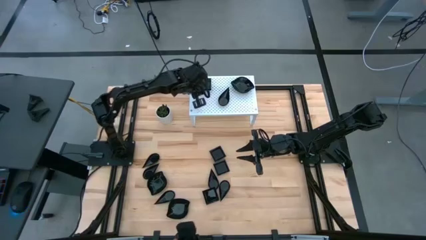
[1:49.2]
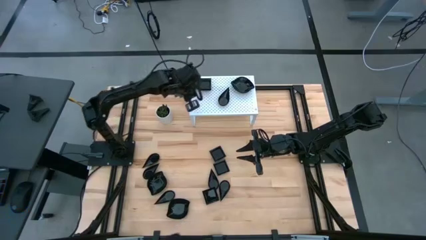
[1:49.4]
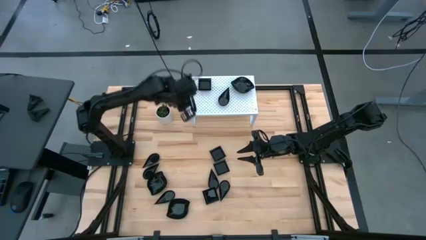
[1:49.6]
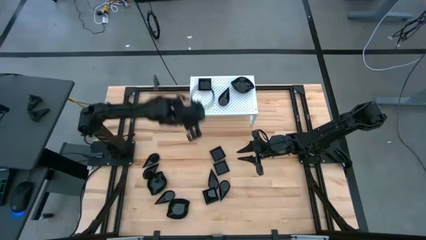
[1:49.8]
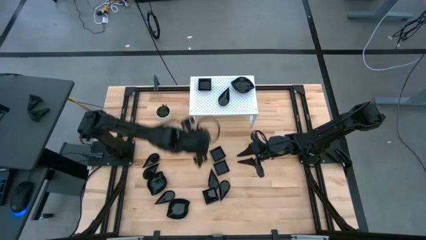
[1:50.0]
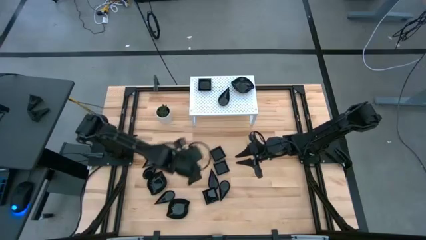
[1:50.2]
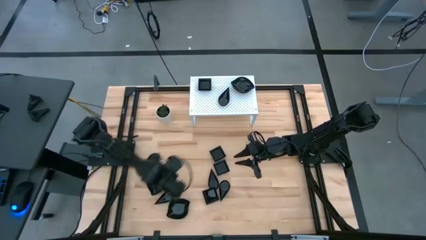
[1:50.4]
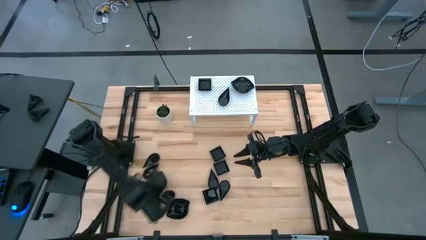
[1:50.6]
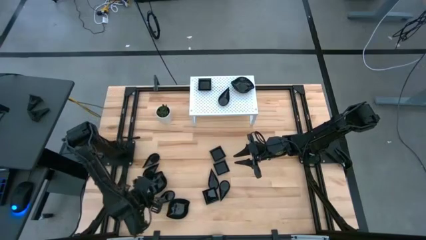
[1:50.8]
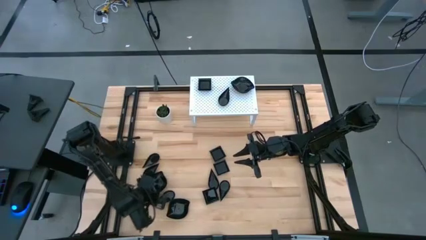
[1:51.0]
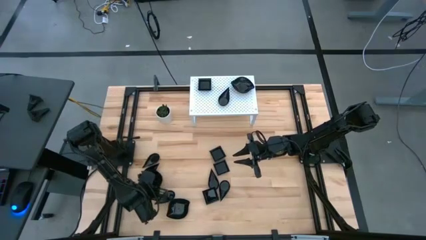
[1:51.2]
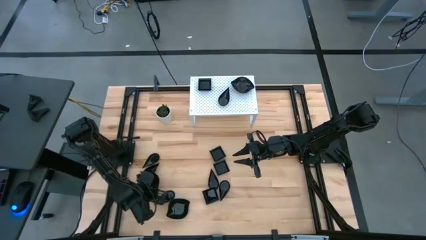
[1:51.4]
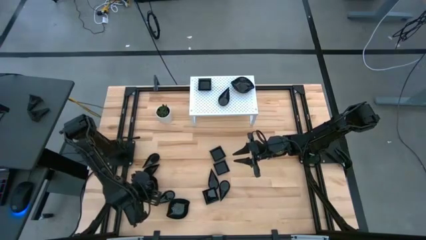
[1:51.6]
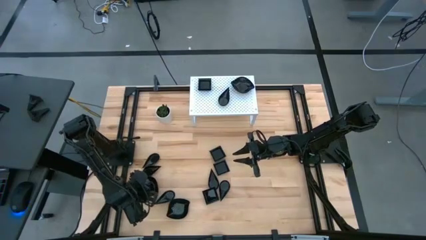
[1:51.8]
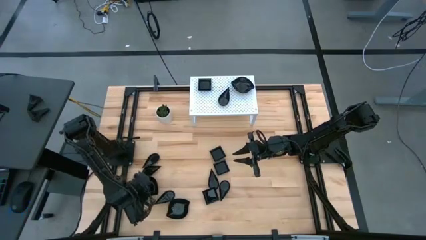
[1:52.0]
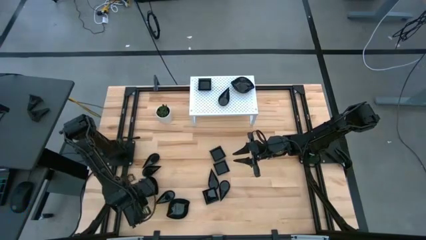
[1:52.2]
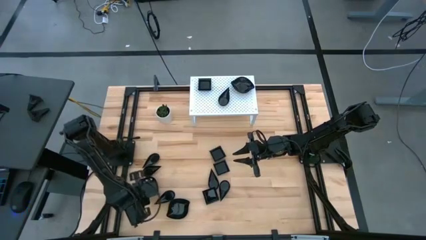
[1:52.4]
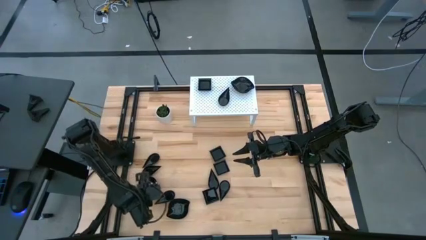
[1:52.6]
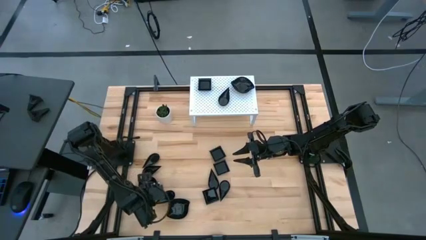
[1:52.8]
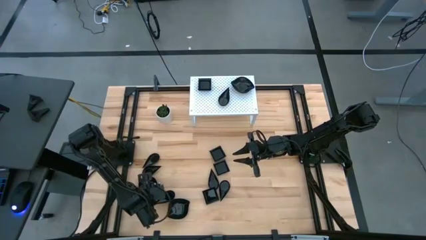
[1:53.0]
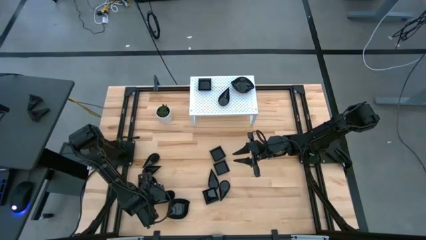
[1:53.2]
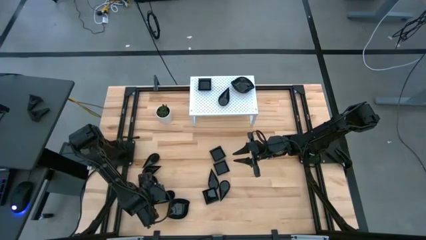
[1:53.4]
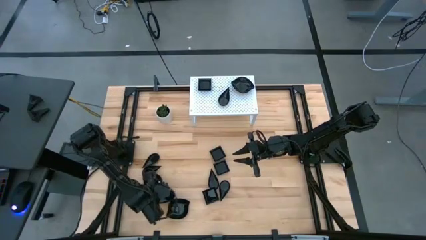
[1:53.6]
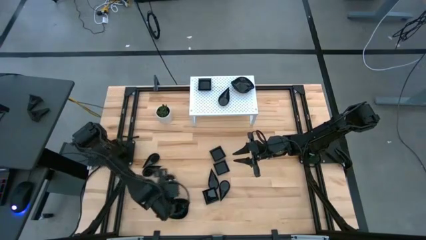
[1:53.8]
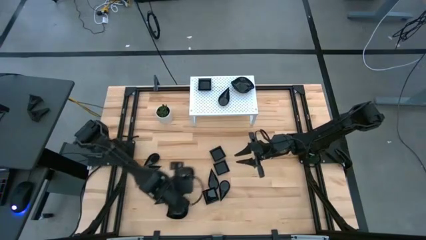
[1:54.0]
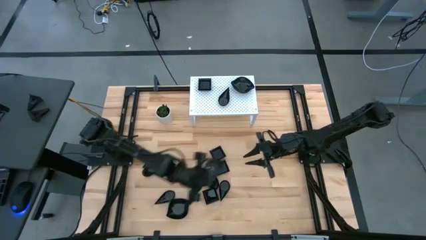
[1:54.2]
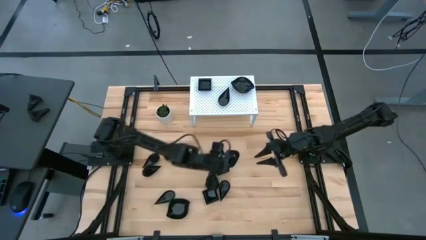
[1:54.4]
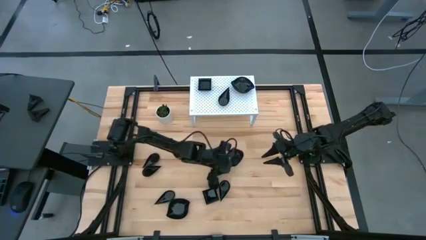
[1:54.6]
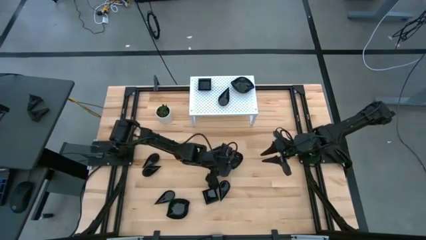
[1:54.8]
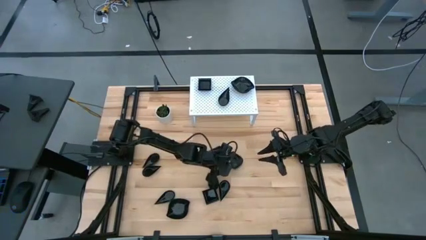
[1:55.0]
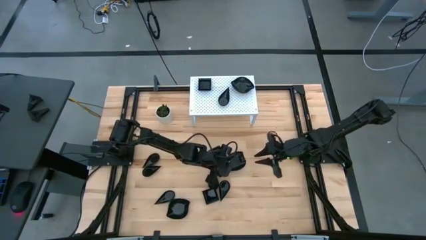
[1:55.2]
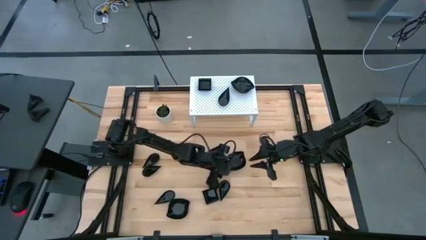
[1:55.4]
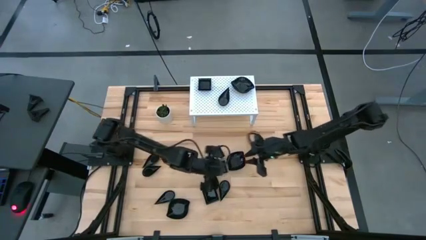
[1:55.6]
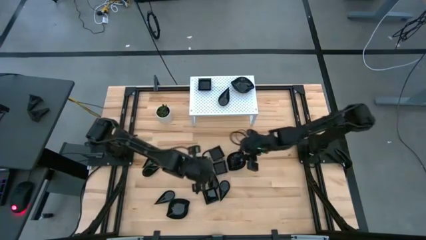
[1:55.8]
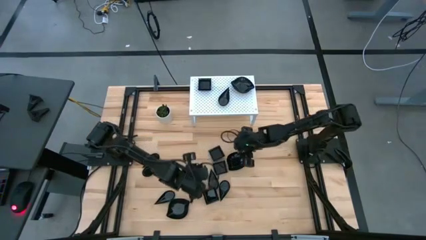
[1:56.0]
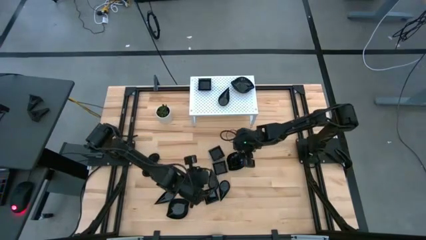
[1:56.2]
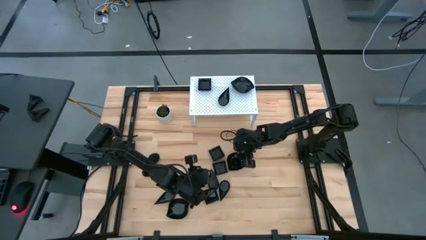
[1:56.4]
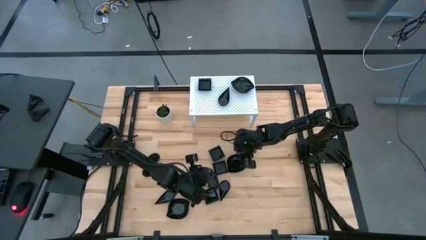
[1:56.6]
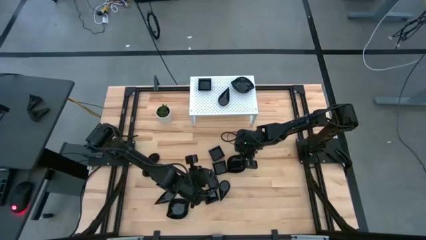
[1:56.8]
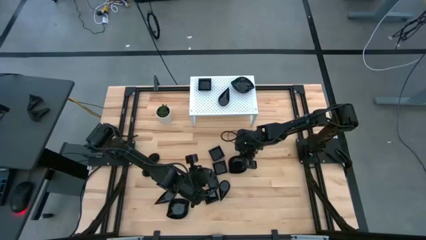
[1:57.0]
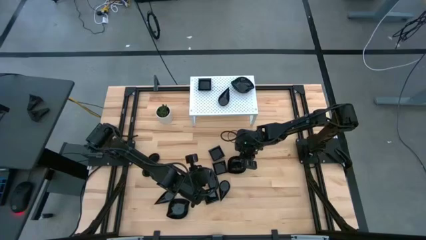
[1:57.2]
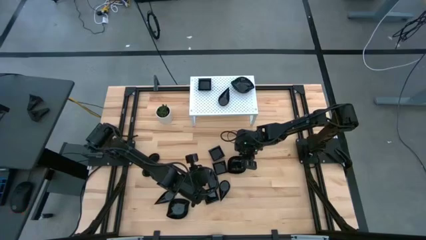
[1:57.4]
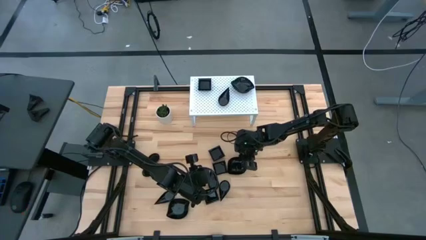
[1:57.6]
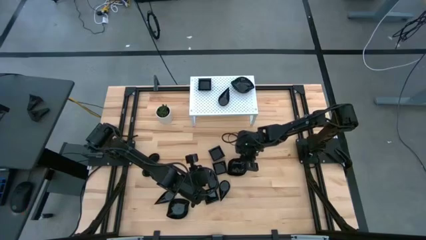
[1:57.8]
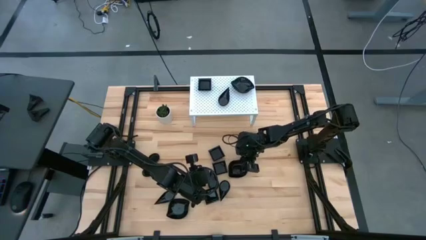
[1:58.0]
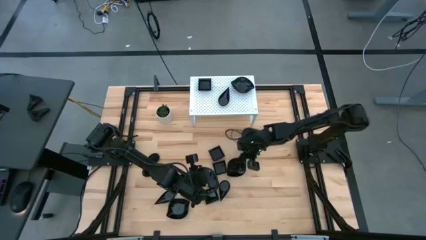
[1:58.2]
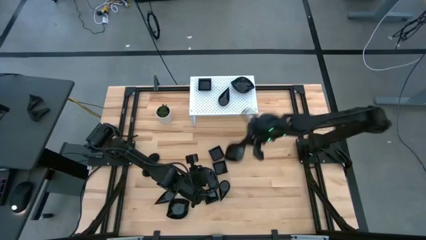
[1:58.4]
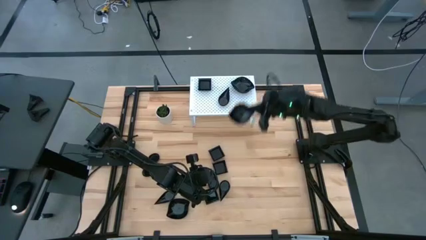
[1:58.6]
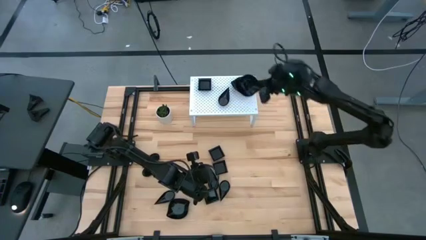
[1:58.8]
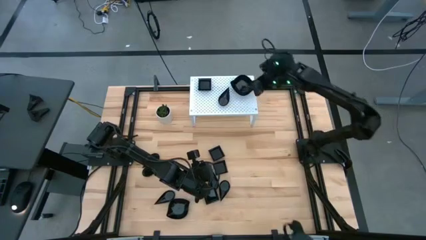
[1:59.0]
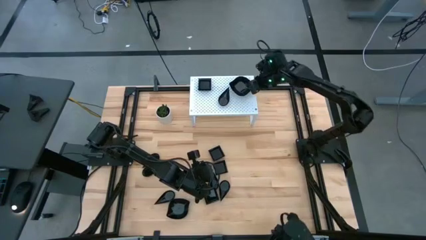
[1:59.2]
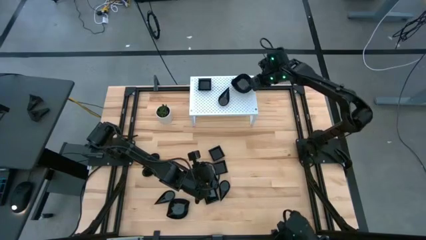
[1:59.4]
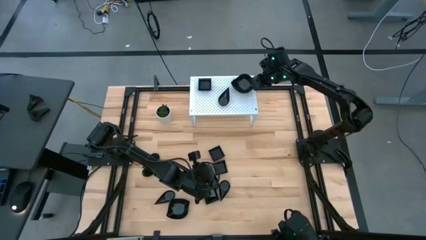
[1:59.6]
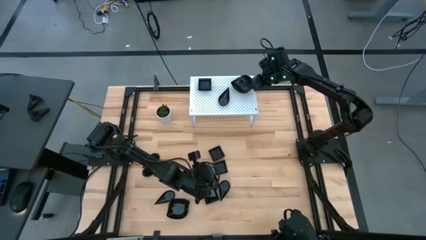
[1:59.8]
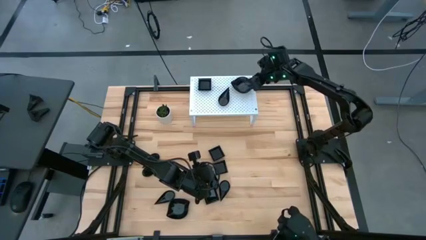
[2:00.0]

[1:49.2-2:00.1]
Task: Pick & Place Mini shaped plates
Stack the black plate on top of the black plate on the shelf

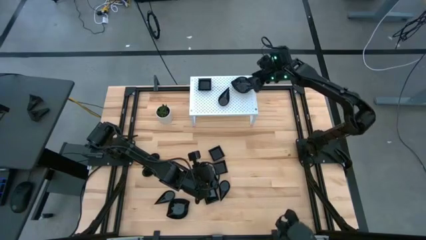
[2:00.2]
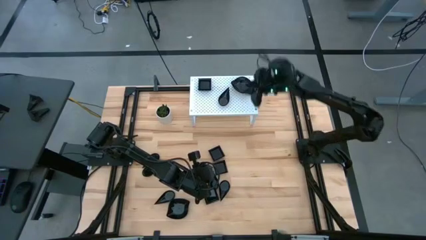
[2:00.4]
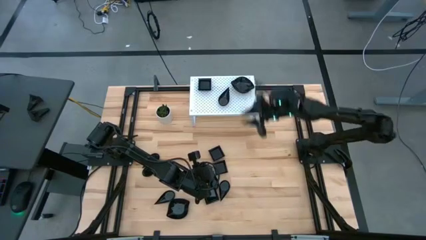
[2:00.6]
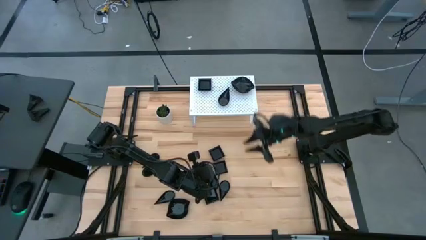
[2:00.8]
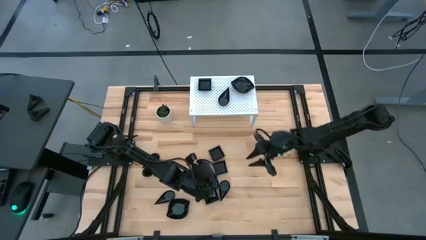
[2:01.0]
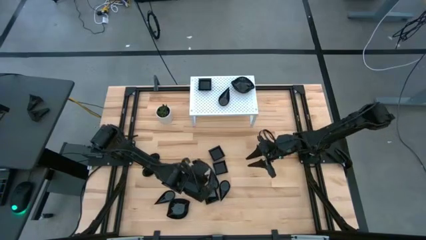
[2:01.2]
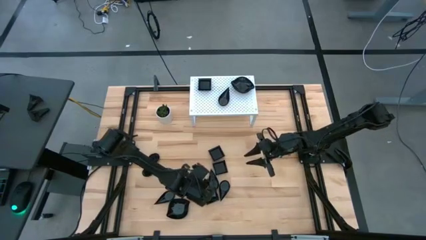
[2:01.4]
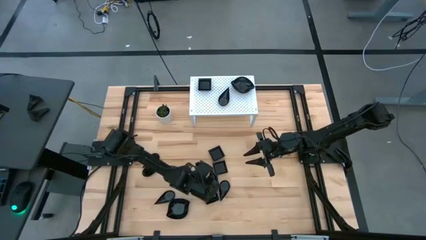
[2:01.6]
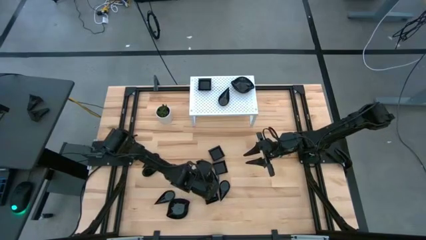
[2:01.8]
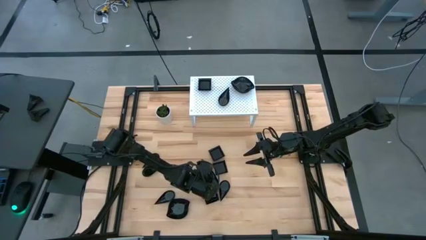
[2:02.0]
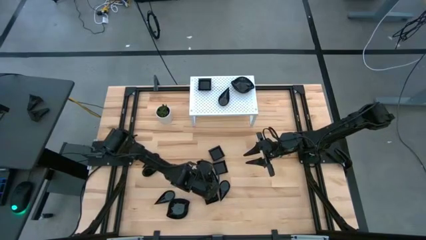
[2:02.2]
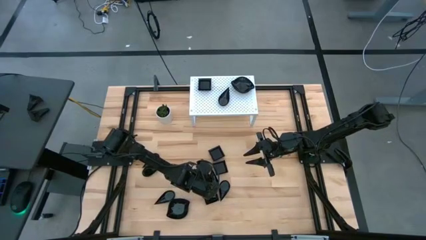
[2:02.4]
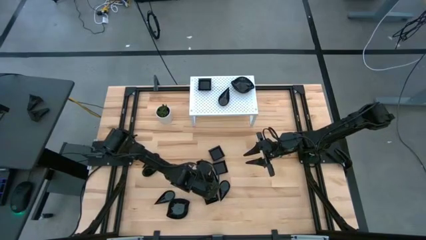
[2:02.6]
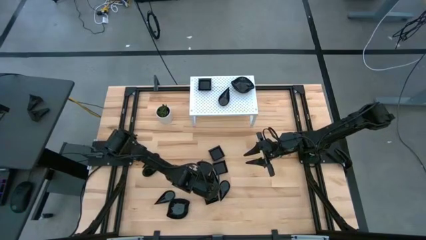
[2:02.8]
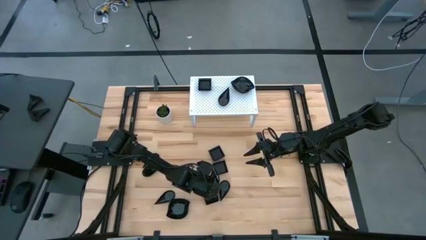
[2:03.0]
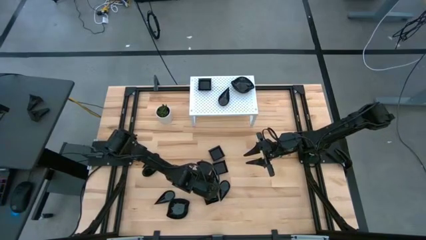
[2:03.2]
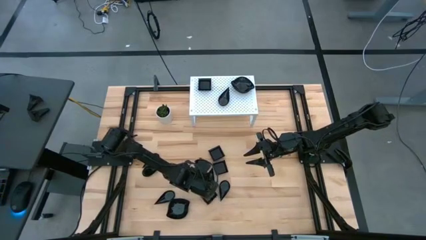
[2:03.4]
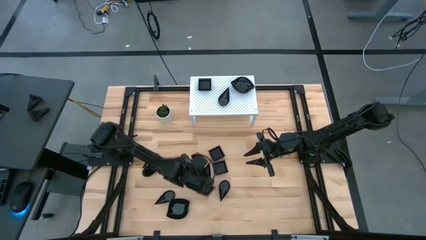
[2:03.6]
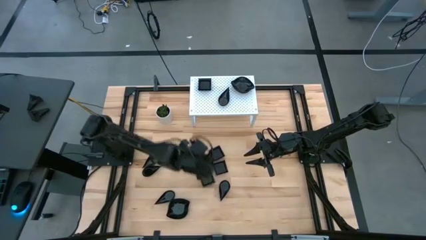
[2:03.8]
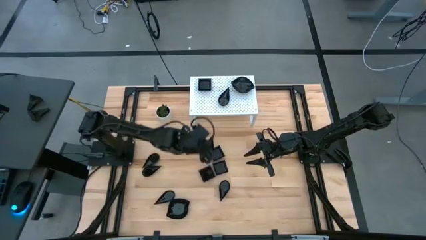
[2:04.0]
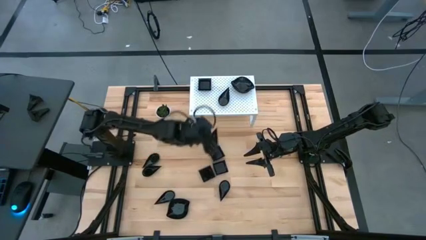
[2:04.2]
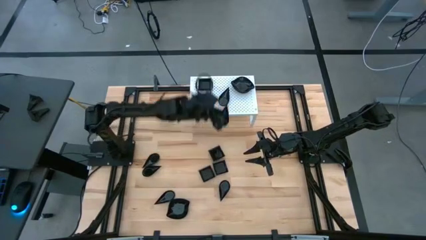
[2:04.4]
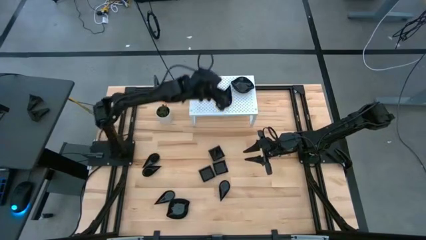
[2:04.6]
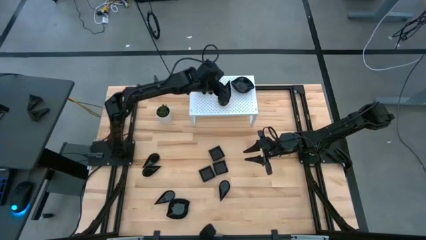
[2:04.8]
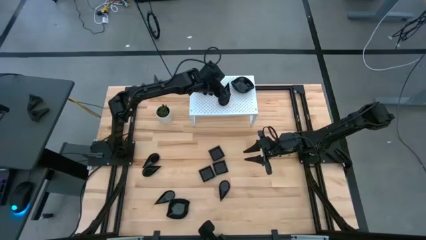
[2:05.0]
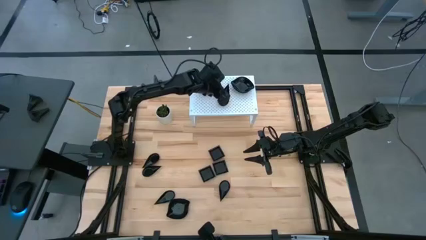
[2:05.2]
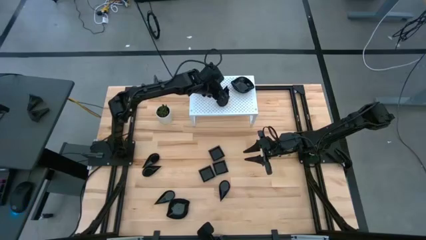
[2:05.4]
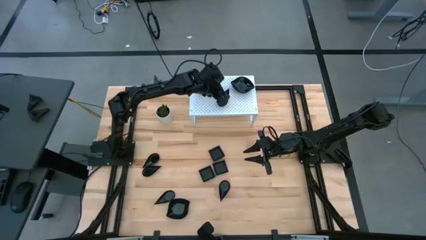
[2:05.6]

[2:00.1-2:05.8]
Stack the black plate on top of the black plate on the shelf
